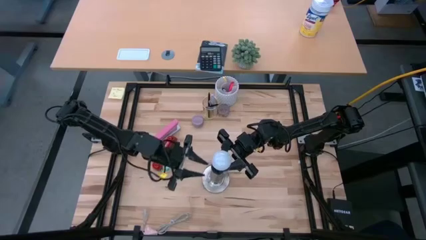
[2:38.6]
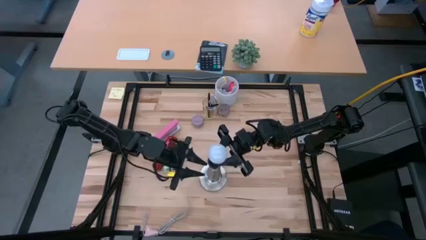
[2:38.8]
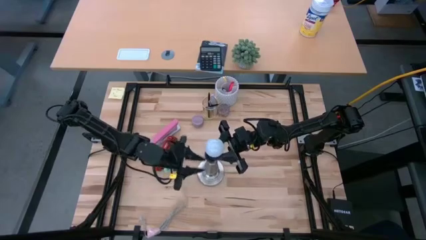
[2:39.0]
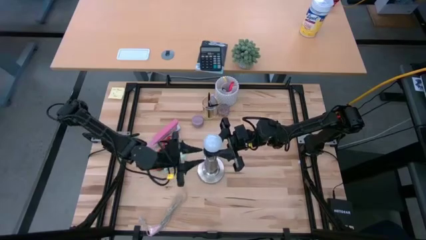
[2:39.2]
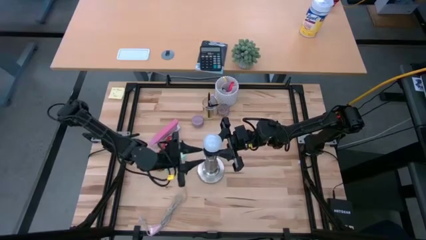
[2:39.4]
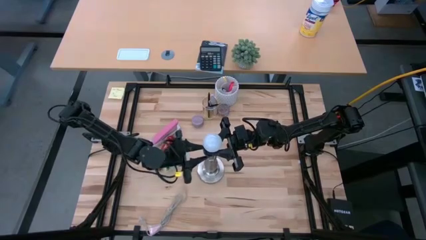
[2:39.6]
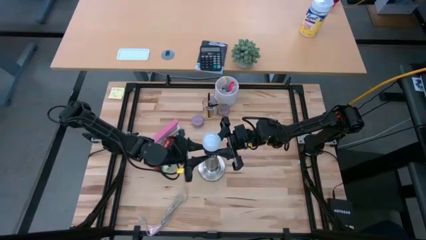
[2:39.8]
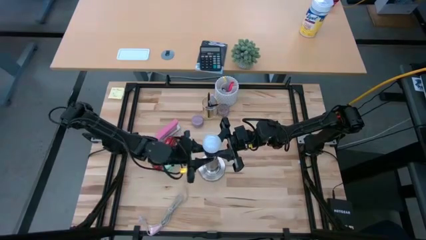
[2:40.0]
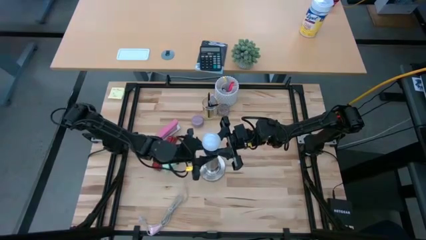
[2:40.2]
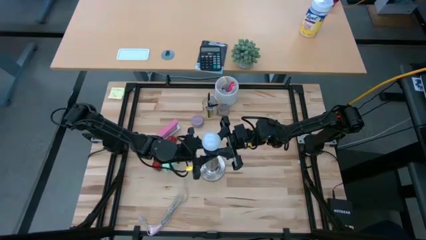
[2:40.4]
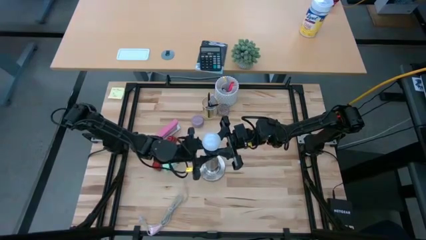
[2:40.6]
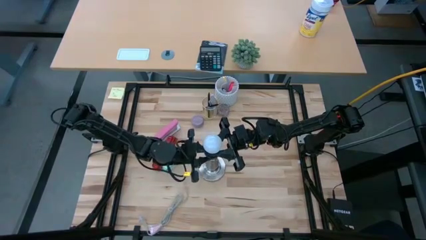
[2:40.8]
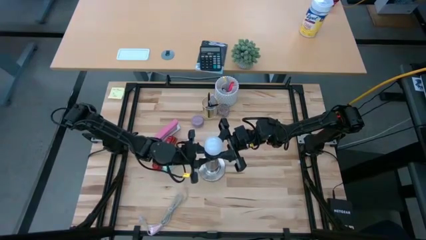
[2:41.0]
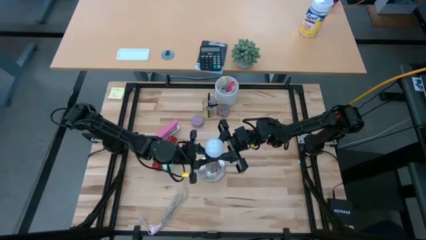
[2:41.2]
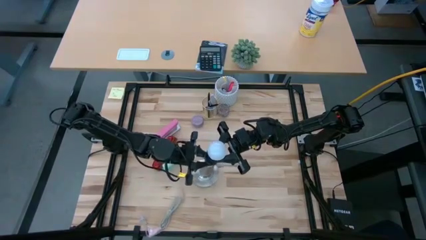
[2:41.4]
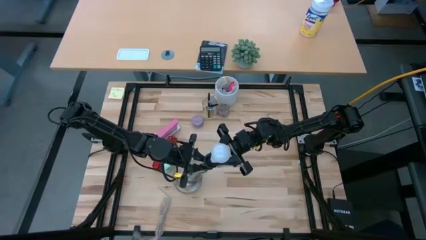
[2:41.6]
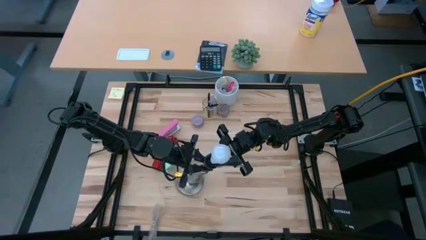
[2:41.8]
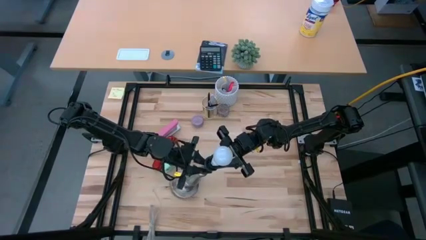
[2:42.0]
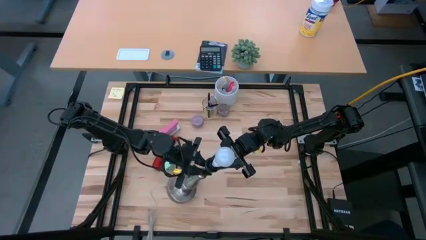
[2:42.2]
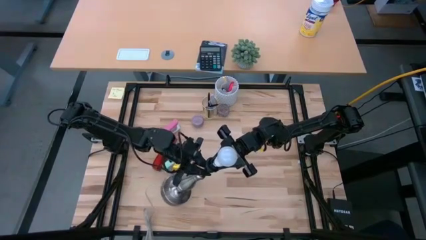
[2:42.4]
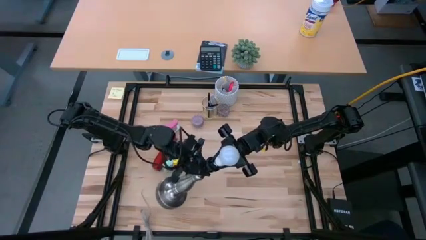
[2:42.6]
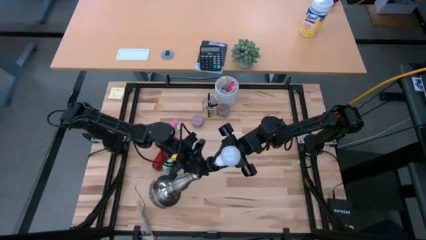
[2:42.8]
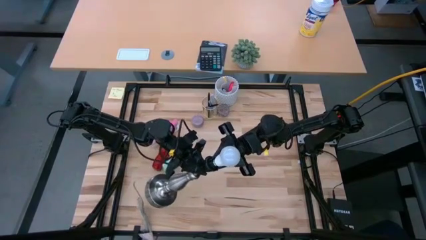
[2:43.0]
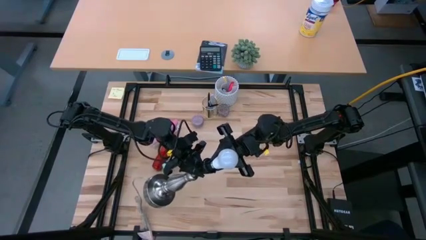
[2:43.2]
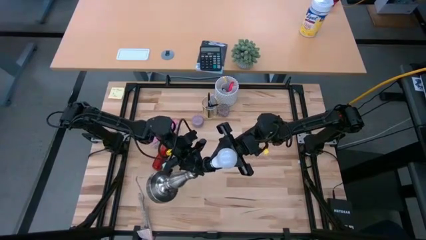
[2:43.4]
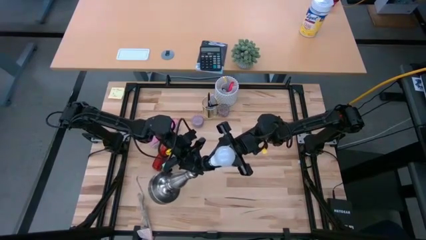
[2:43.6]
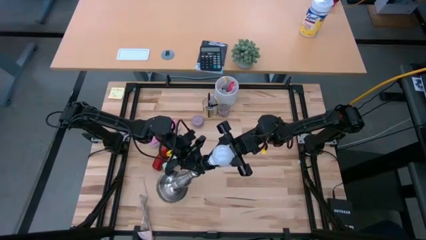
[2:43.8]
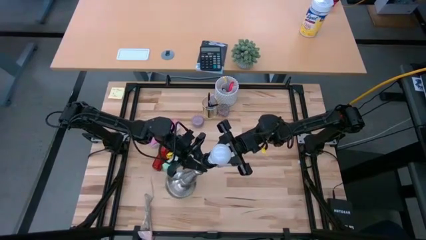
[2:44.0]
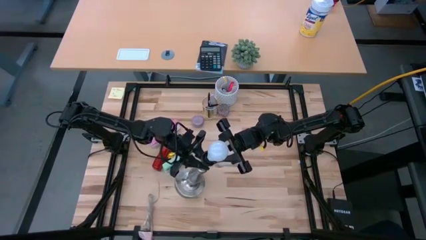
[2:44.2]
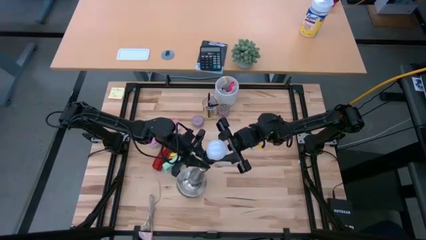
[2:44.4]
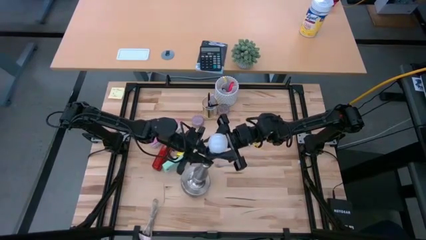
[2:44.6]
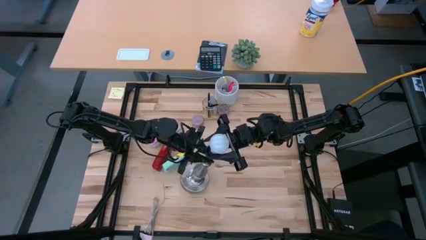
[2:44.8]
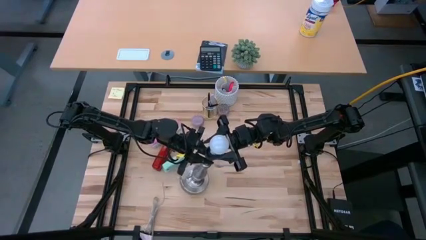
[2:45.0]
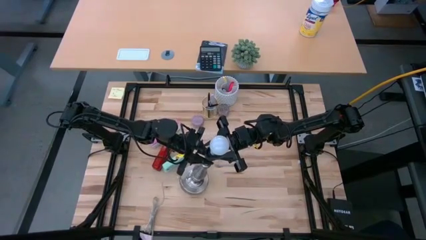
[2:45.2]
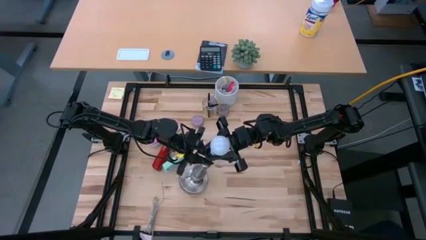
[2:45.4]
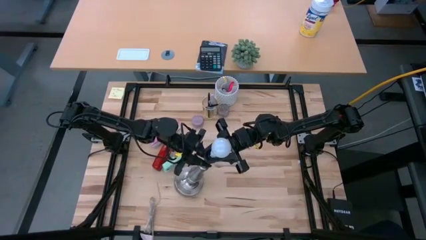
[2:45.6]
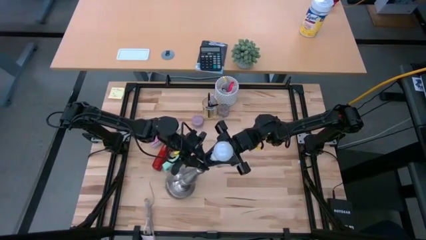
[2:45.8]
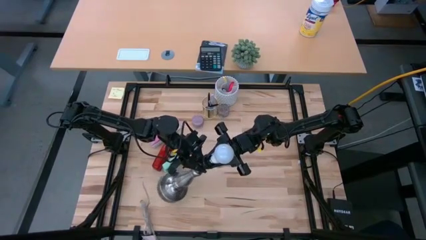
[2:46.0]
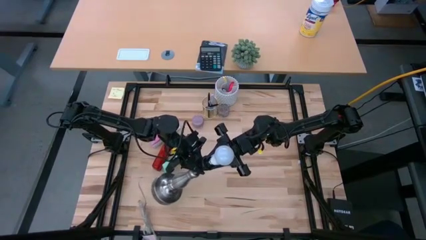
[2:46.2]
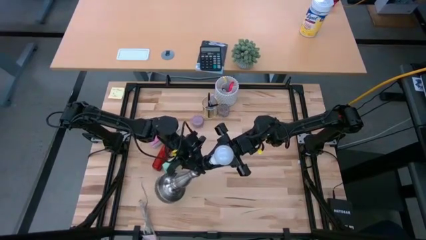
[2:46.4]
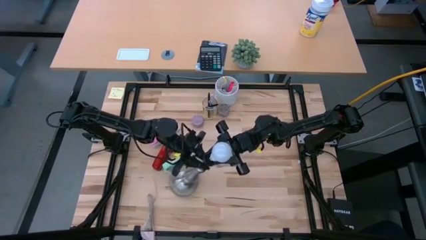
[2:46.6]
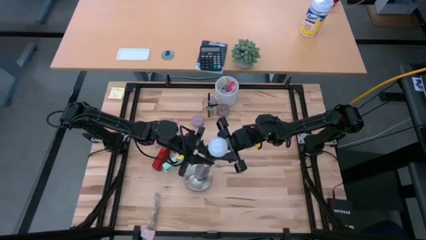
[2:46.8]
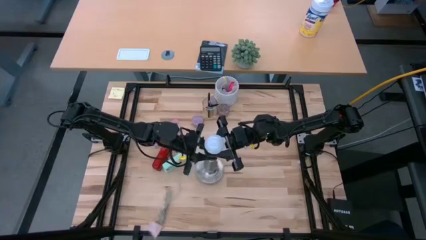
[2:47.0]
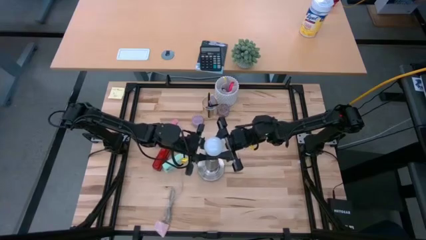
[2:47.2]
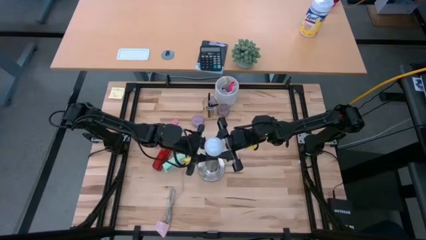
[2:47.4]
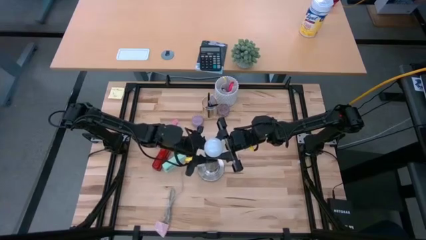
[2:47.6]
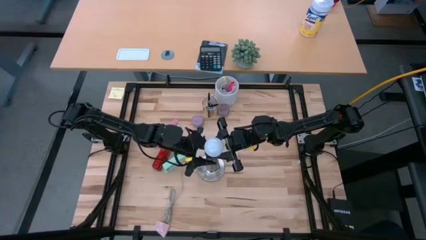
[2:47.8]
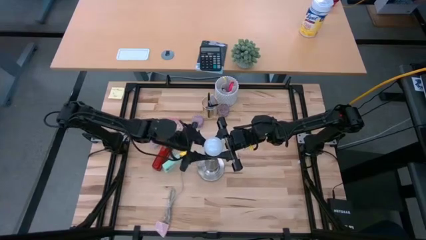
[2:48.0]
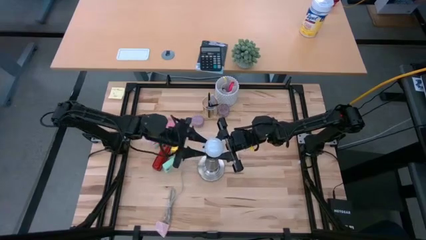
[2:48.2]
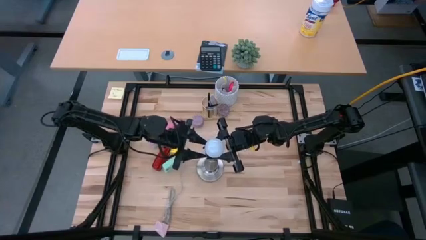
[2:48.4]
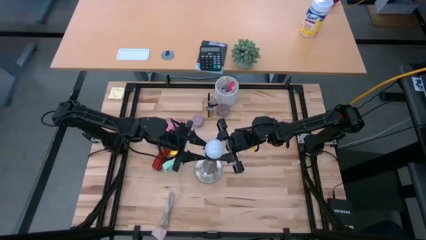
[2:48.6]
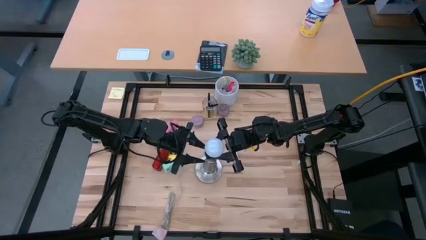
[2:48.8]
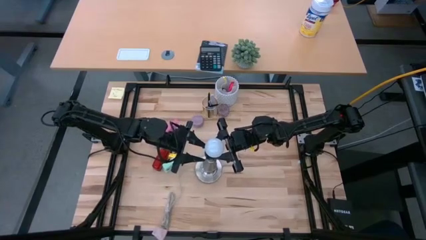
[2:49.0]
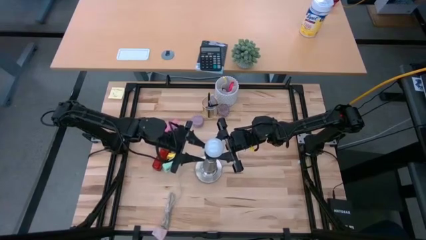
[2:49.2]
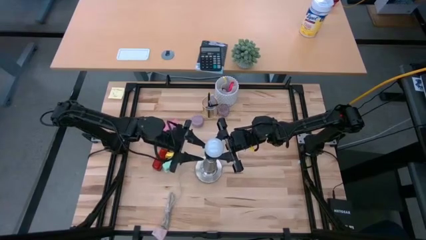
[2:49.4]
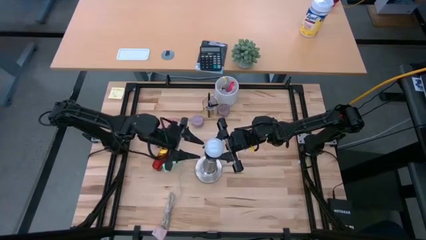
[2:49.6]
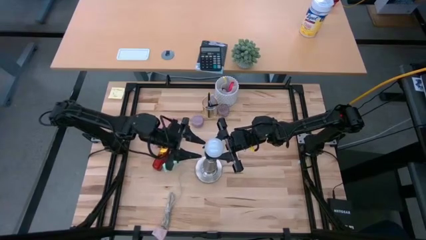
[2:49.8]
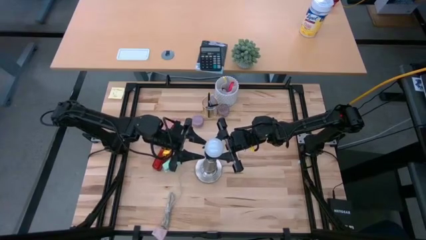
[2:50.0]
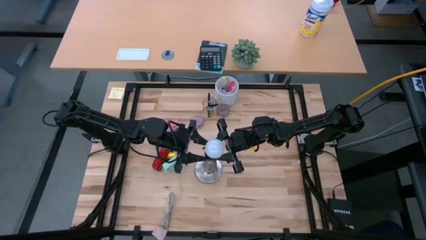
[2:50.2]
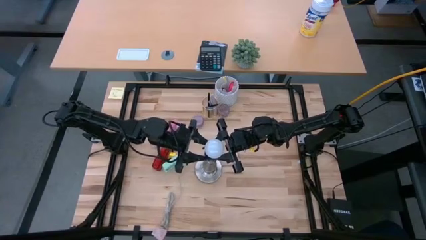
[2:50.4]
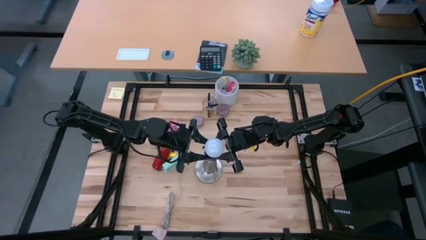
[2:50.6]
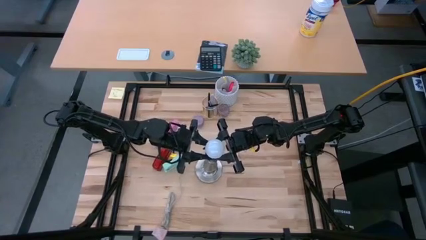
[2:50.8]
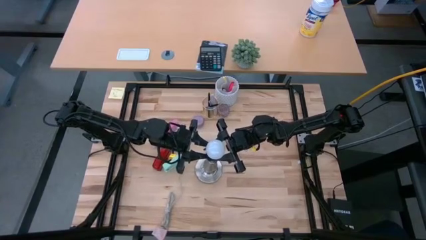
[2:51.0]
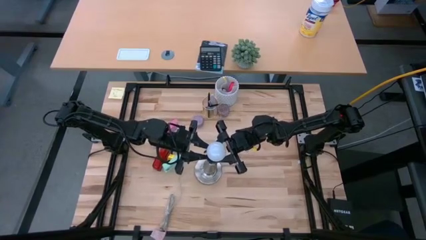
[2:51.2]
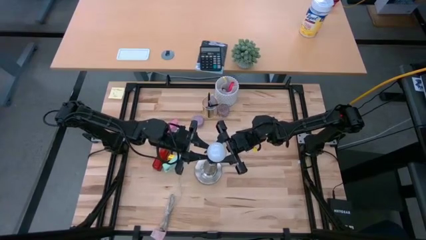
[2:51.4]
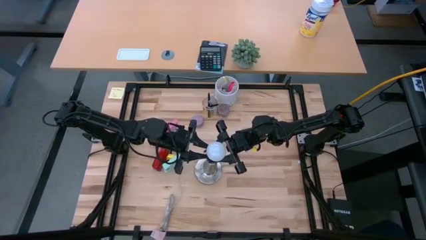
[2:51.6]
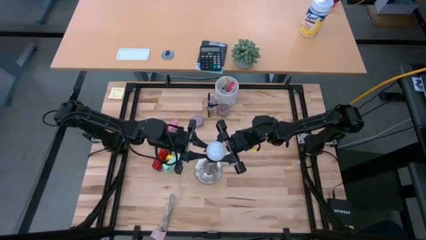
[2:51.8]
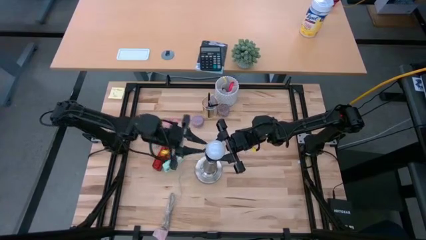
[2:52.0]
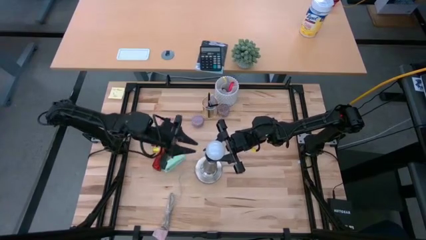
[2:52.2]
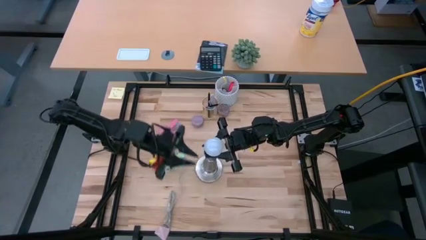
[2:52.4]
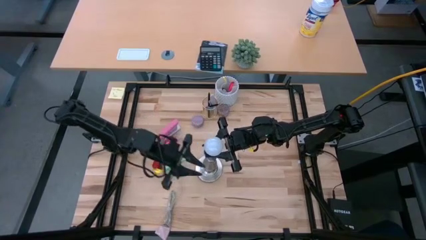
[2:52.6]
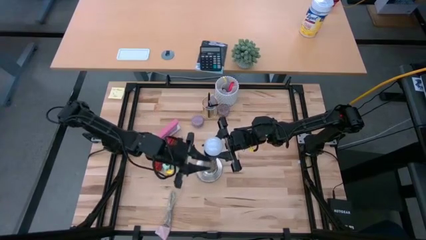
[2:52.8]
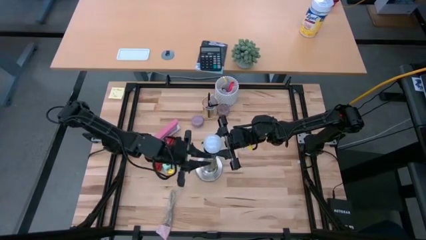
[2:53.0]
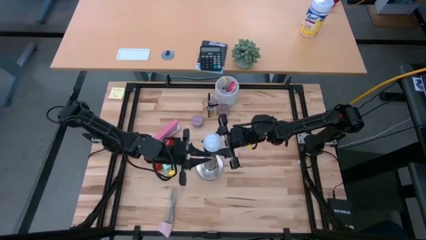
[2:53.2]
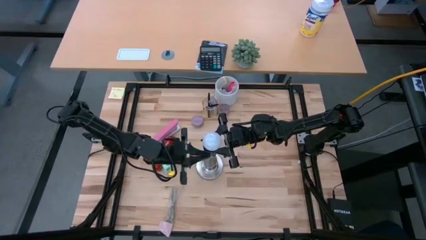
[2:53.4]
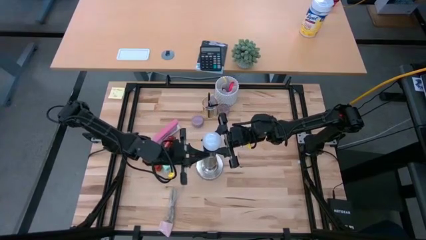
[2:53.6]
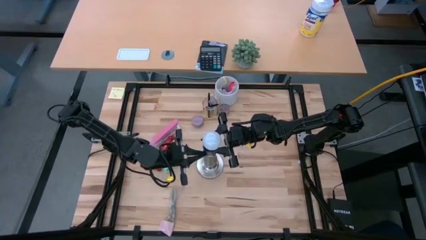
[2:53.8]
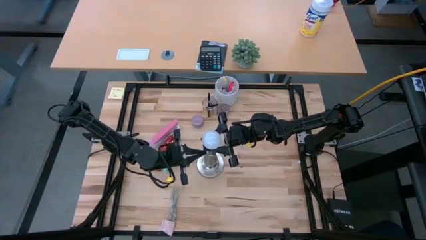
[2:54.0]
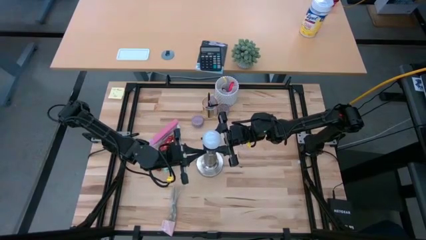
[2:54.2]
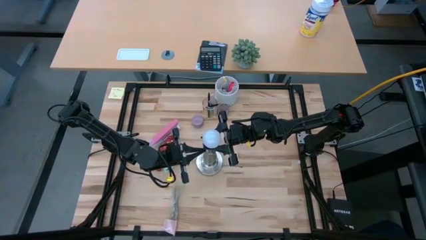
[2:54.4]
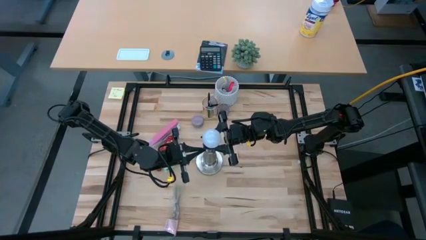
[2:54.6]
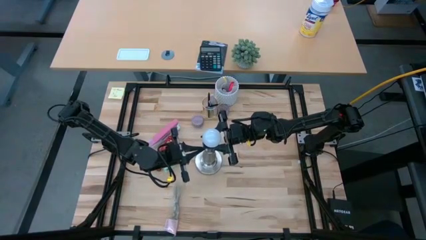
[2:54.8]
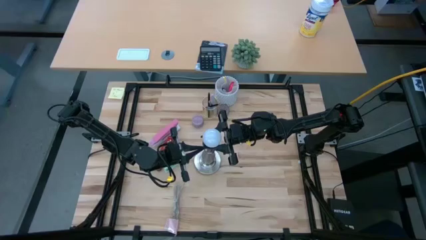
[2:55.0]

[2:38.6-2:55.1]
Task: Screw lightbulb
Remove the lightbulb from the lamp
